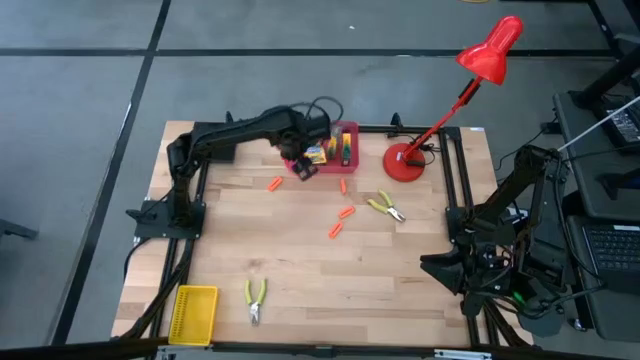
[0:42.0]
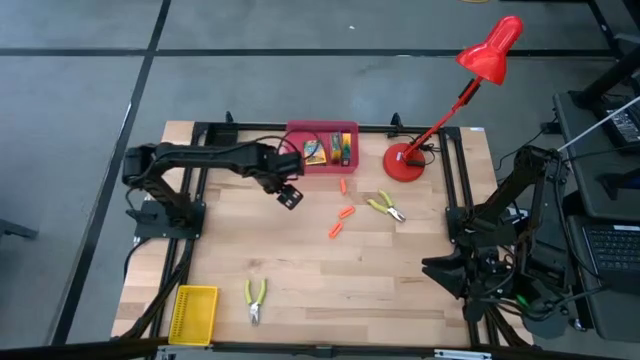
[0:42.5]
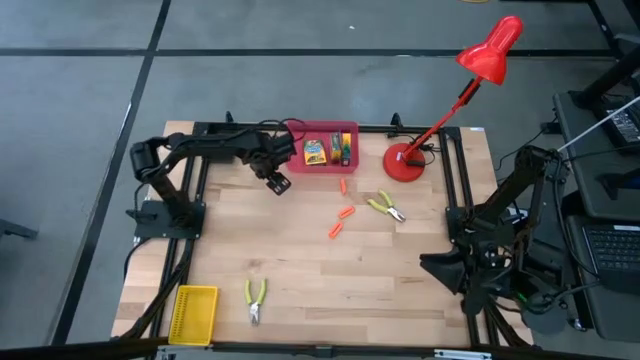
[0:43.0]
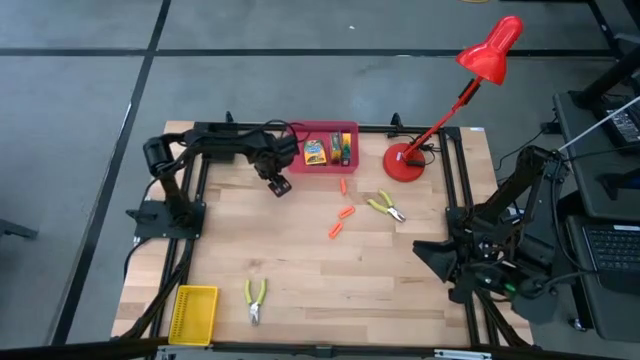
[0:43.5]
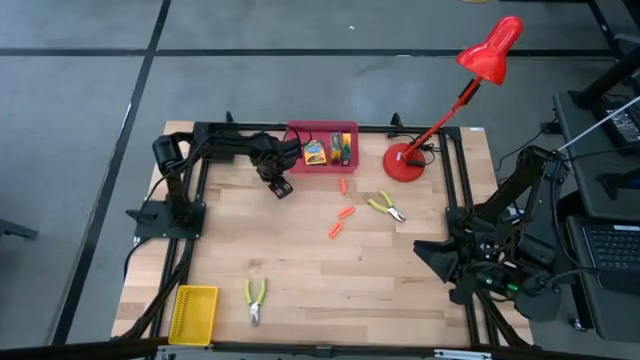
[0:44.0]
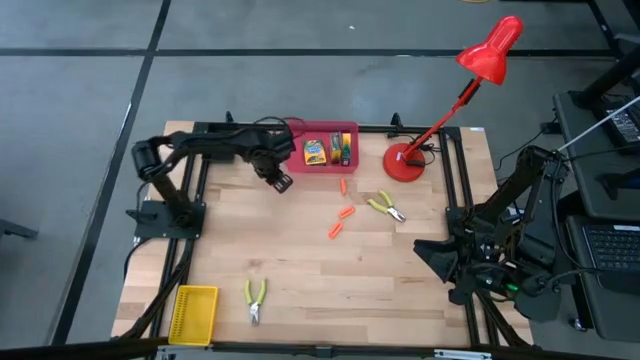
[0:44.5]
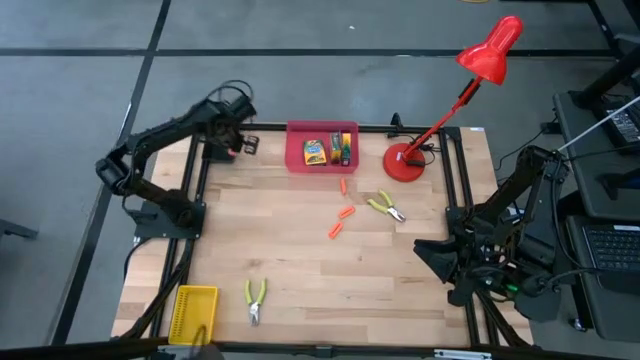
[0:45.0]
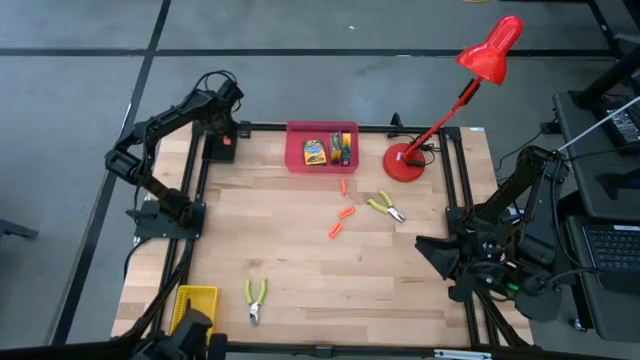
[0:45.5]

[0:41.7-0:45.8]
Task: Pick & Place School Supplies
Put the orange eraser into the black bin

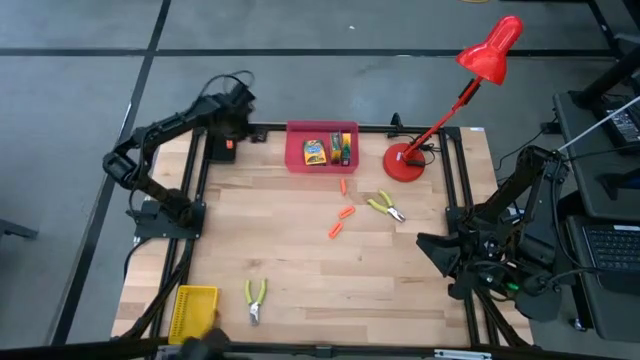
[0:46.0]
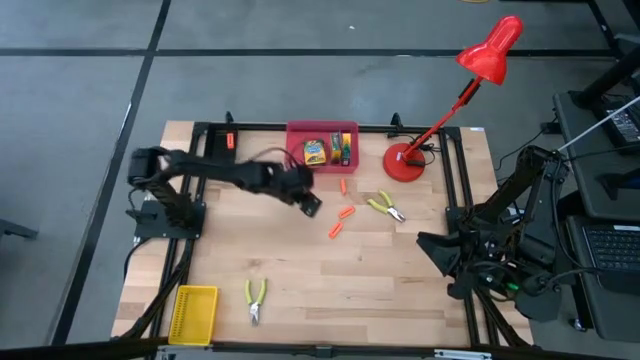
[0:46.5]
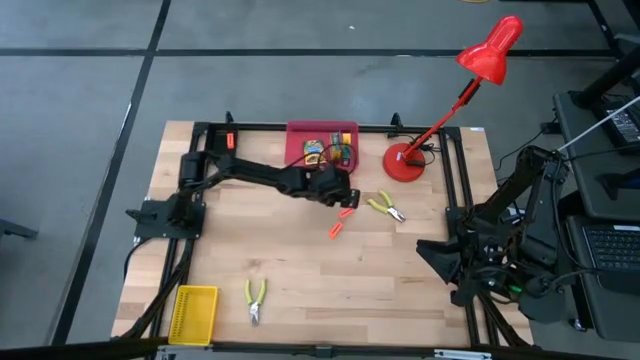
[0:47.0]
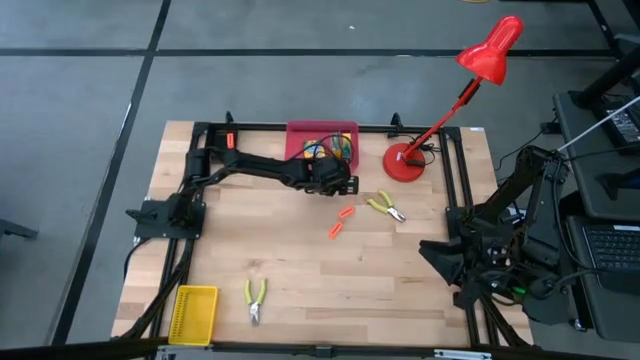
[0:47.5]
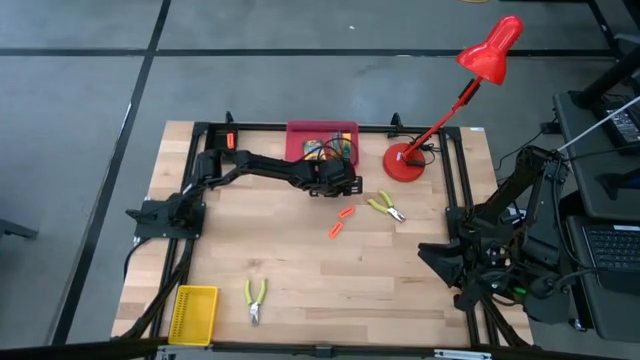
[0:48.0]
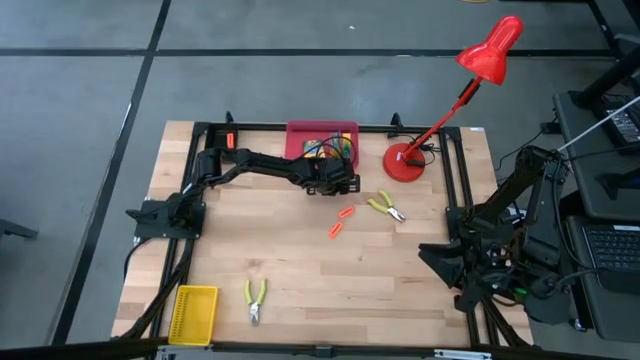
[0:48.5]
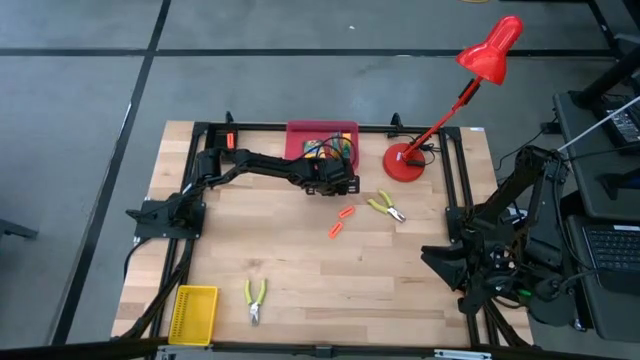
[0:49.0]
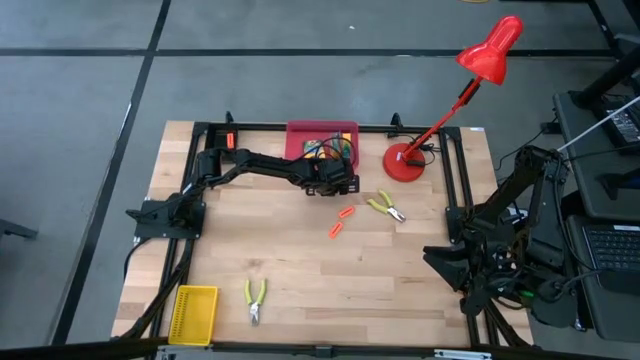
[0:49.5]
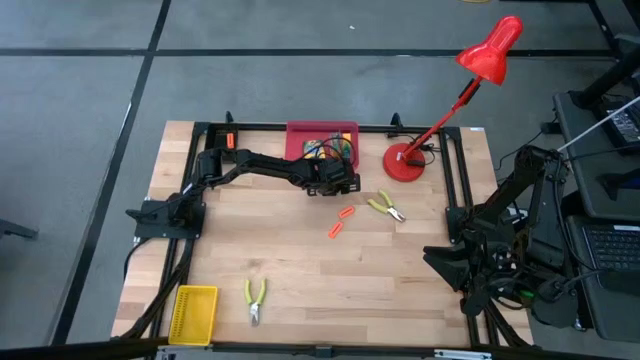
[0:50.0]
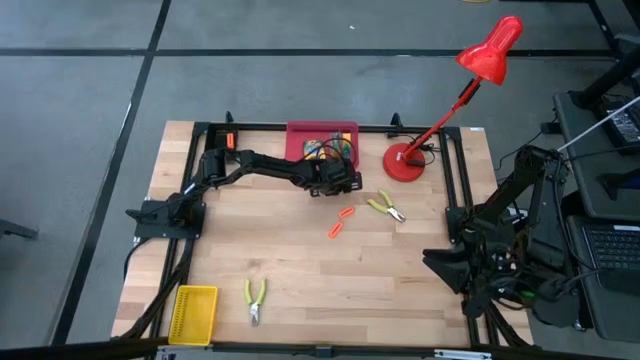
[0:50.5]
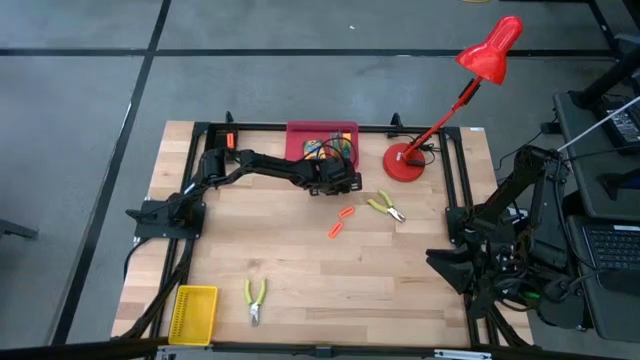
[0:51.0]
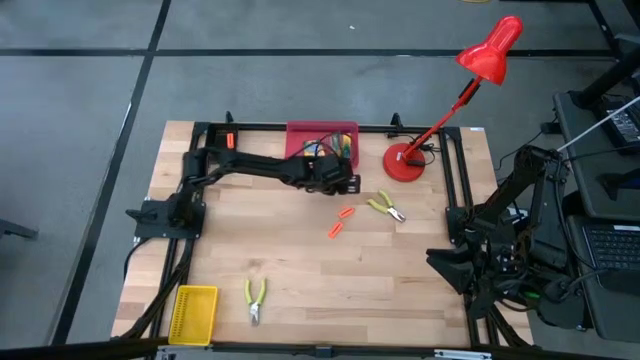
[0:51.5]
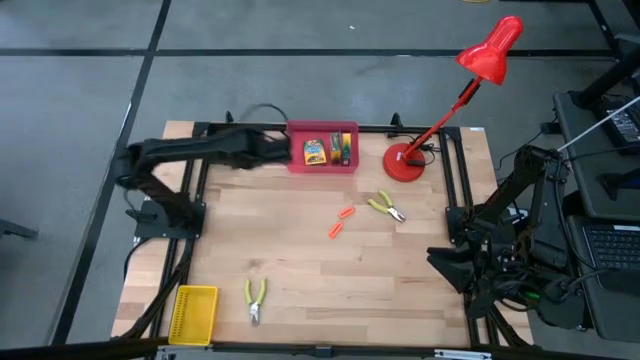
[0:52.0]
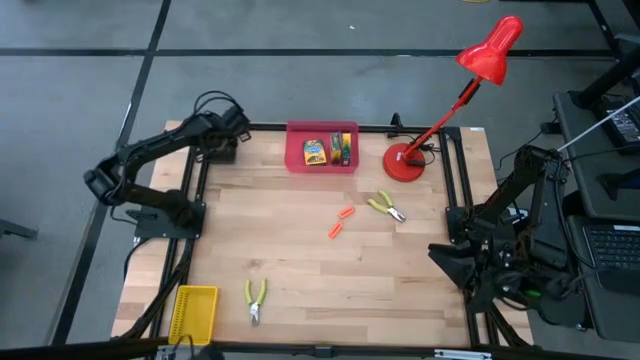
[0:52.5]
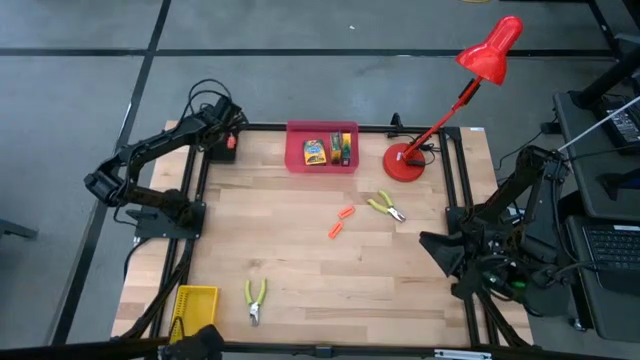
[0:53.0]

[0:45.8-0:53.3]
Put the orange eraser into the black bin

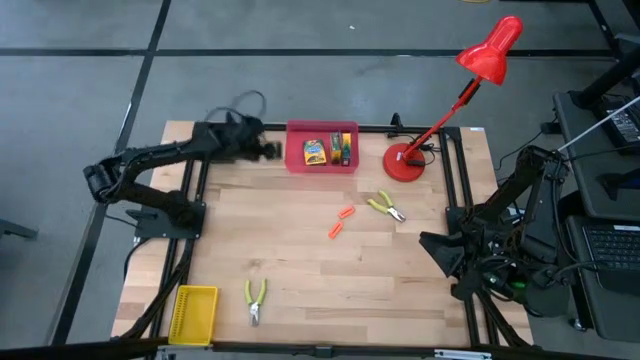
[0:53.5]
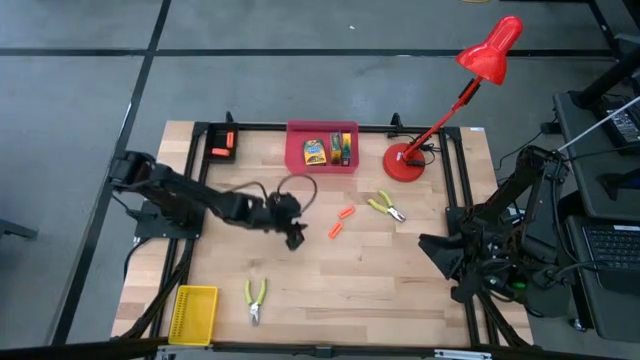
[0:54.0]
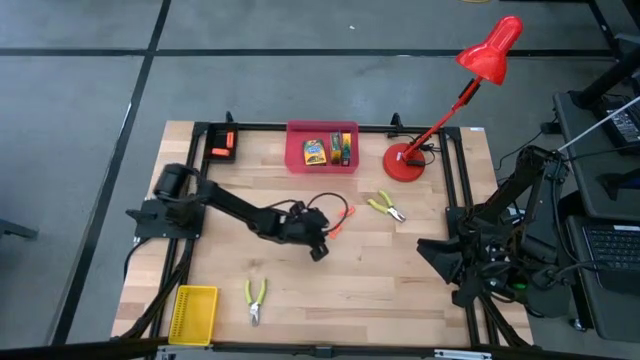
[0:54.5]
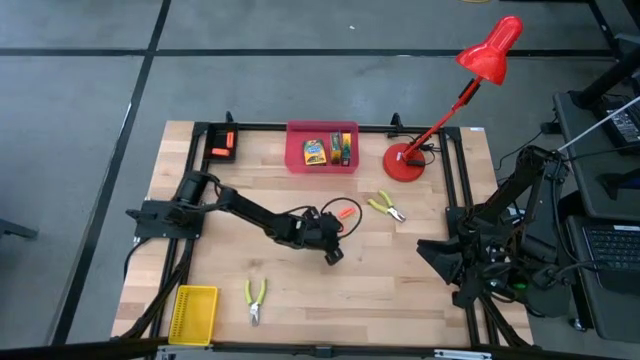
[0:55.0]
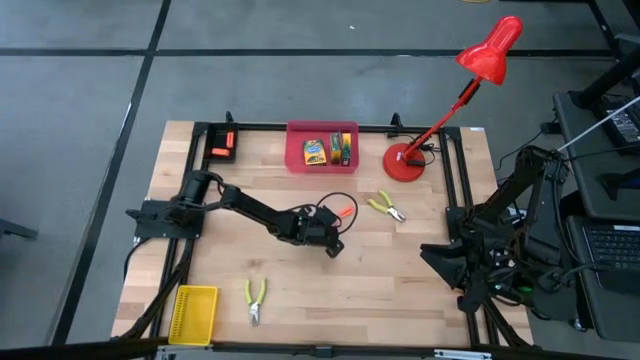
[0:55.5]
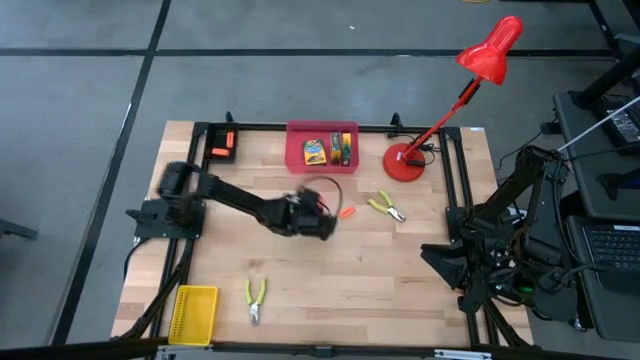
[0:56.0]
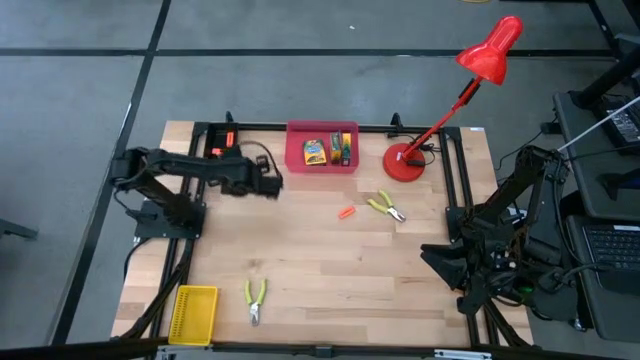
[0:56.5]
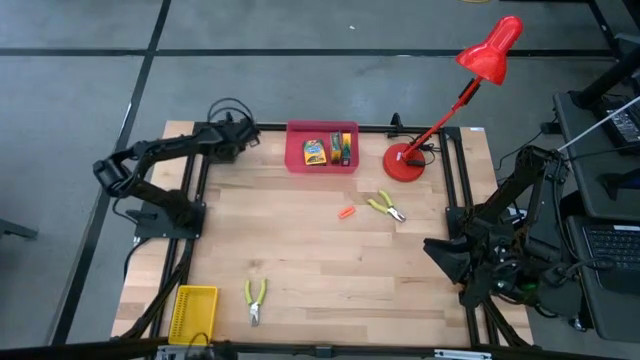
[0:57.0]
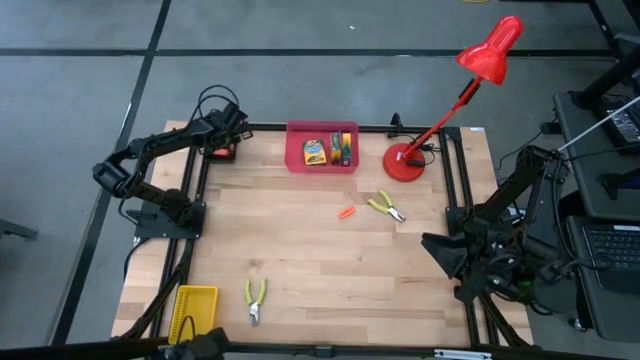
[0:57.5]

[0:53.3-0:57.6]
Put the orange eraser into the black bin

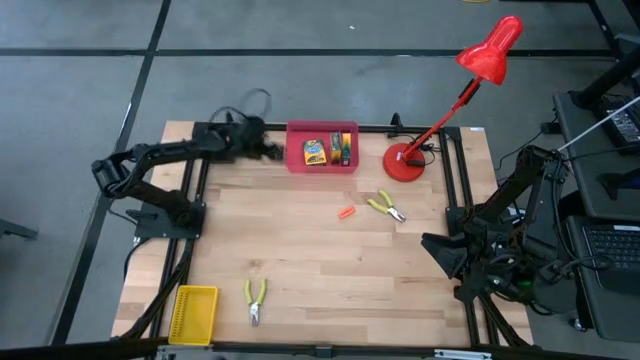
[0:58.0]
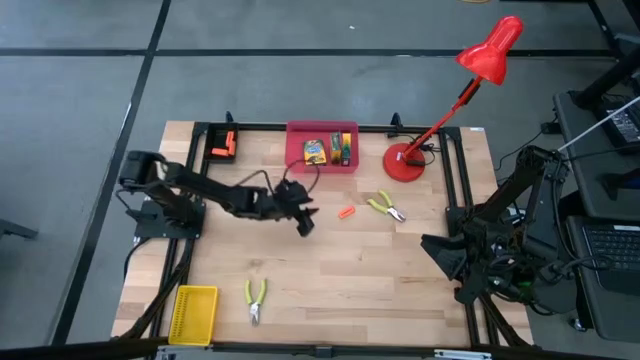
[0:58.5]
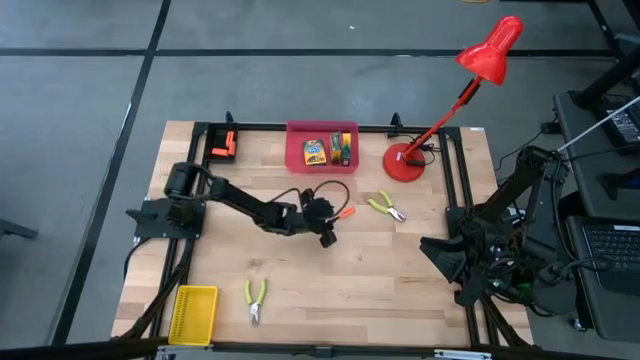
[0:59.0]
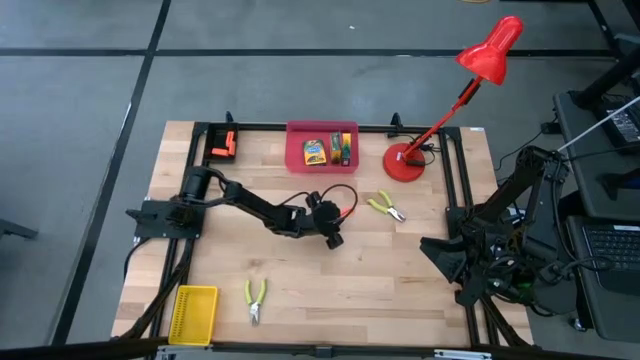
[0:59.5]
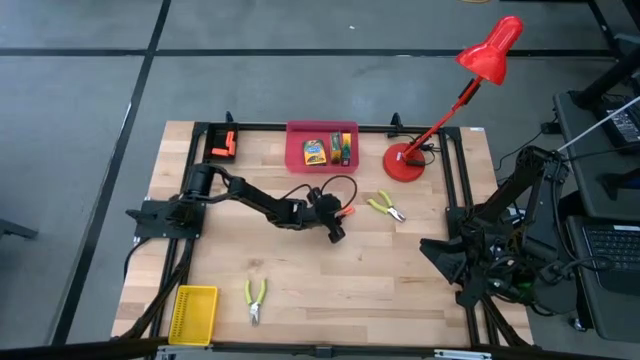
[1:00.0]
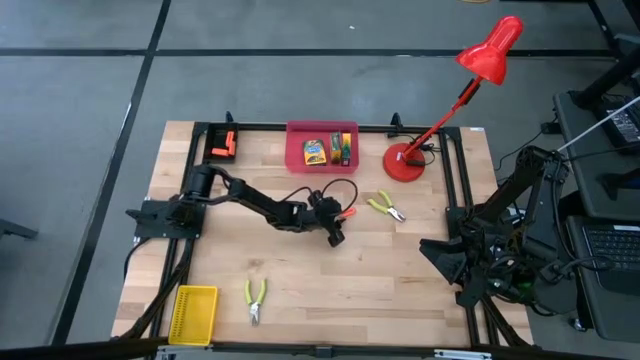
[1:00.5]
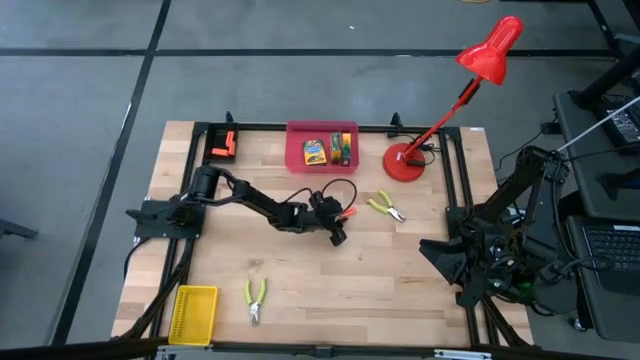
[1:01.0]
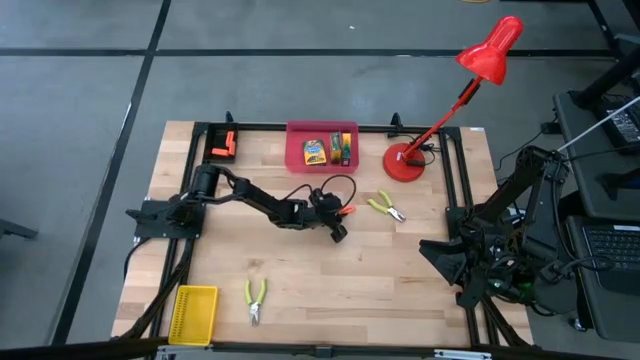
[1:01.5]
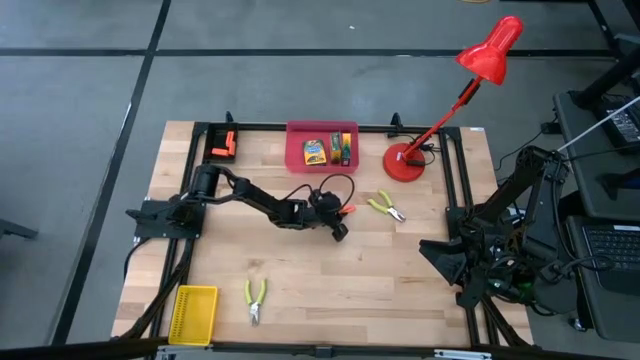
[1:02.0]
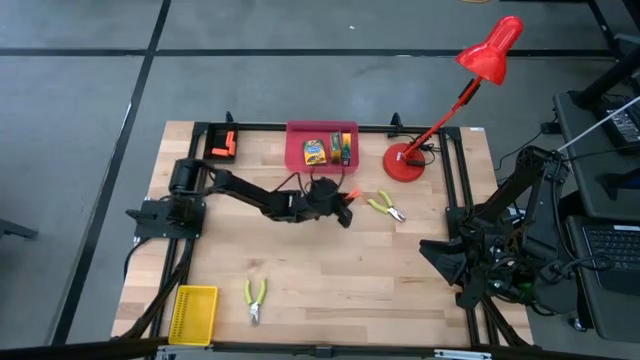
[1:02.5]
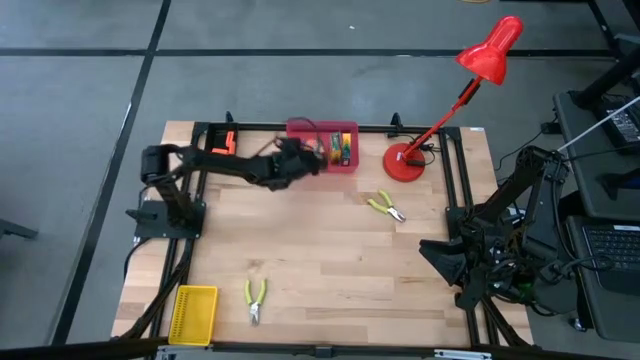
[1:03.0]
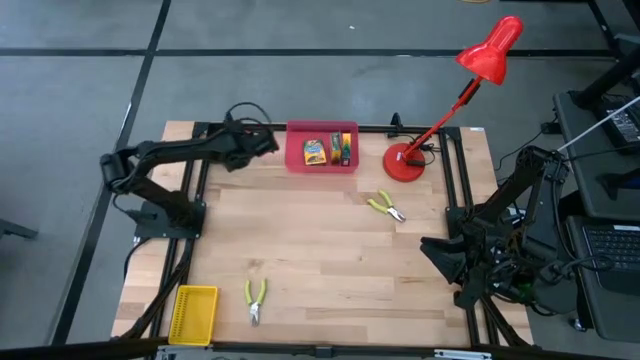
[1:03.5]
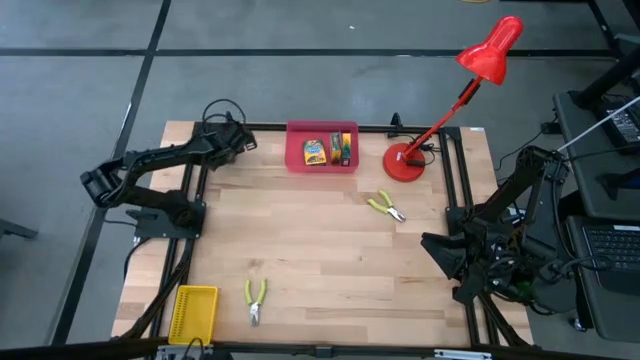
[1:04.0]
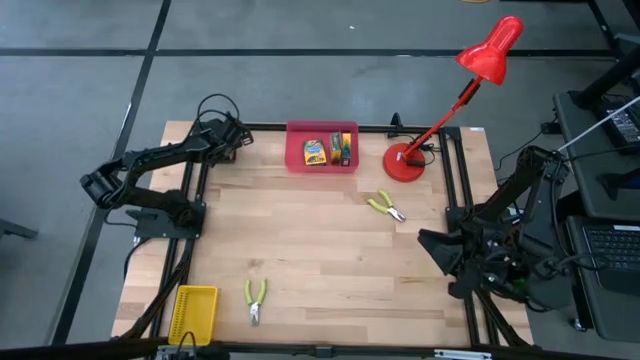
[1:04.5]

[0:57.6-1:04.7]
Put the orange eraser into the black bin
